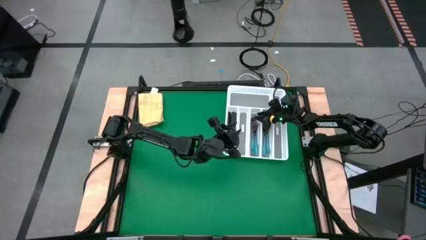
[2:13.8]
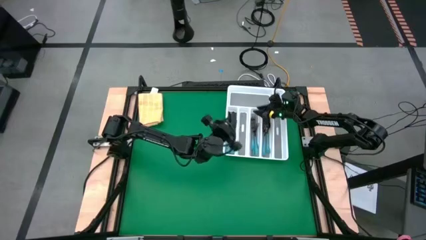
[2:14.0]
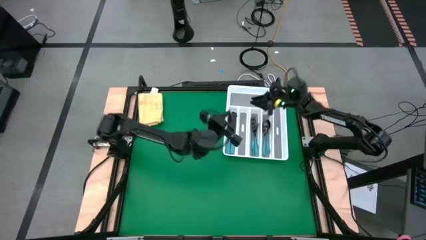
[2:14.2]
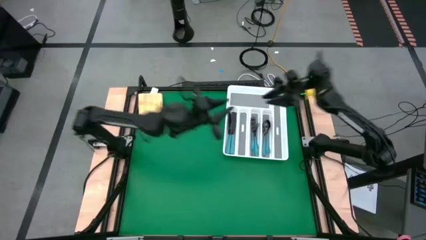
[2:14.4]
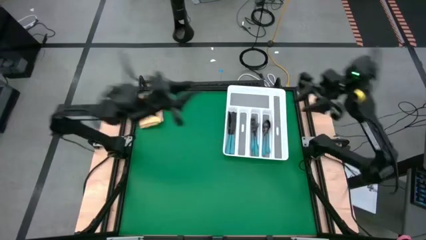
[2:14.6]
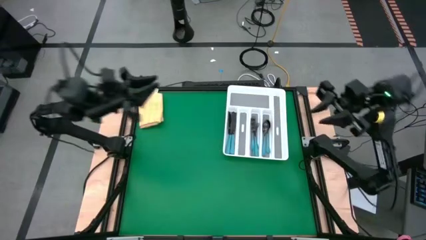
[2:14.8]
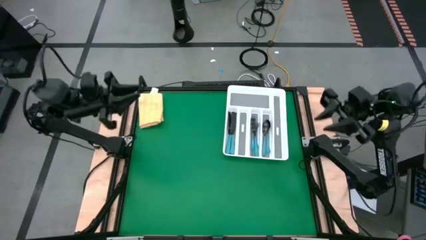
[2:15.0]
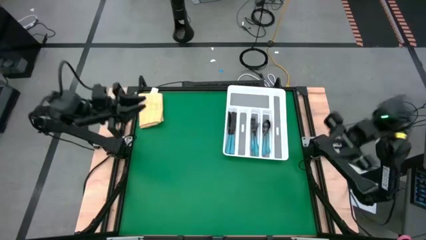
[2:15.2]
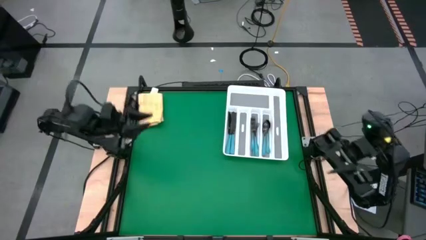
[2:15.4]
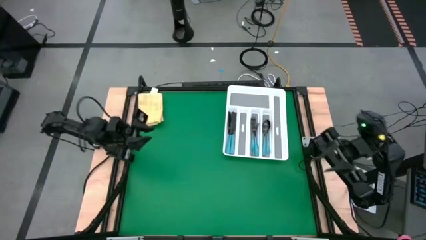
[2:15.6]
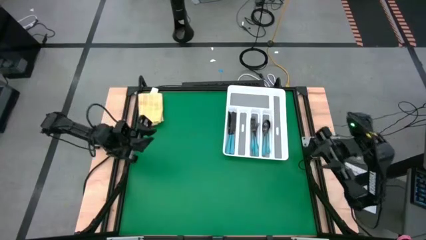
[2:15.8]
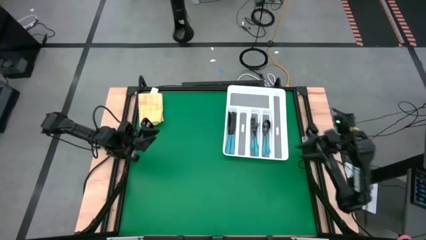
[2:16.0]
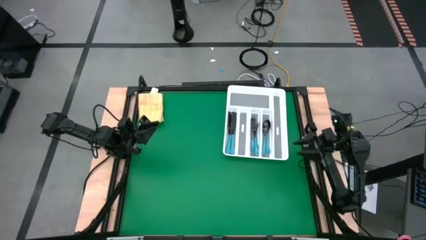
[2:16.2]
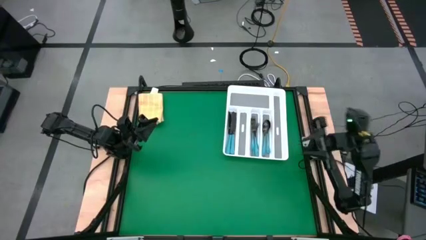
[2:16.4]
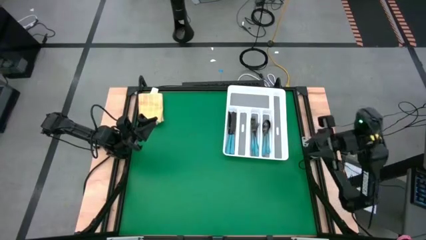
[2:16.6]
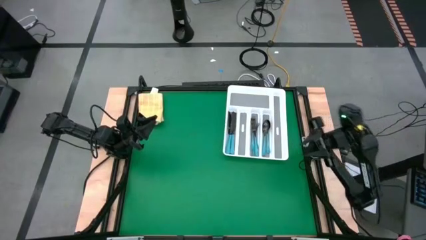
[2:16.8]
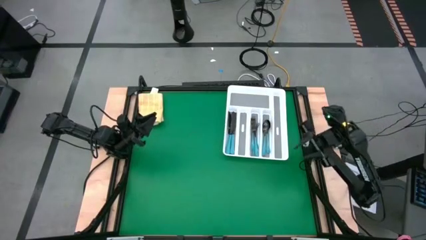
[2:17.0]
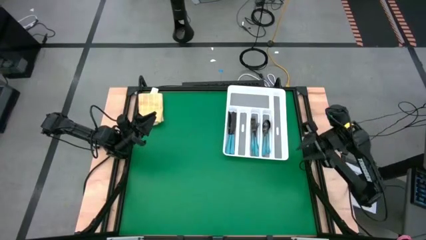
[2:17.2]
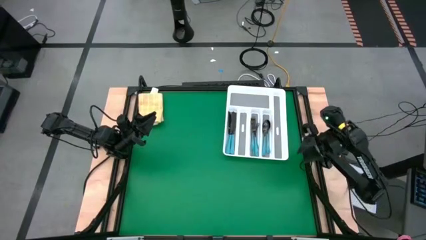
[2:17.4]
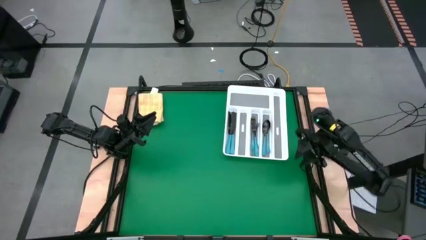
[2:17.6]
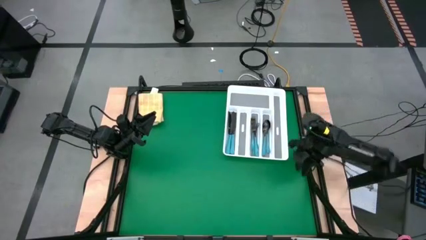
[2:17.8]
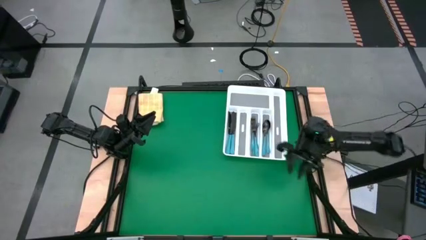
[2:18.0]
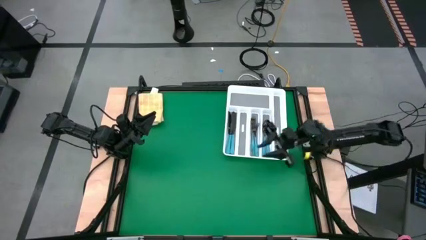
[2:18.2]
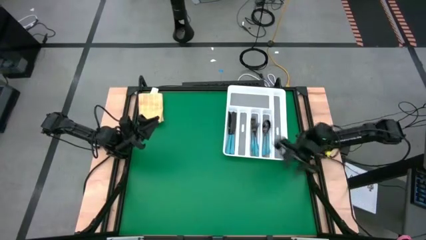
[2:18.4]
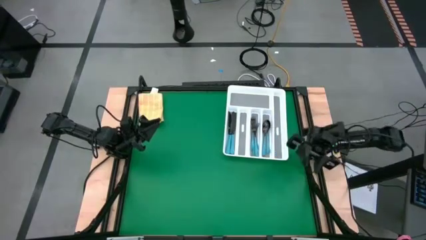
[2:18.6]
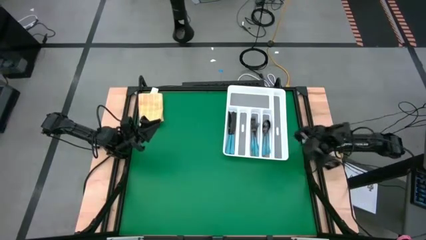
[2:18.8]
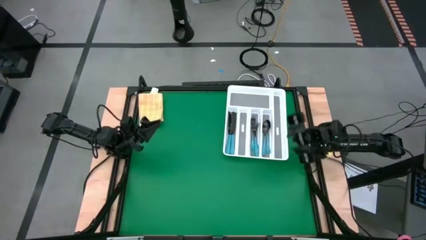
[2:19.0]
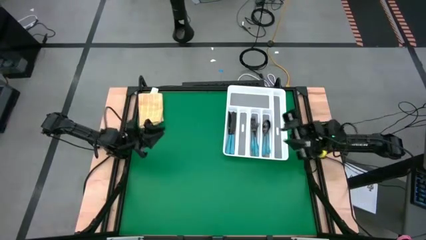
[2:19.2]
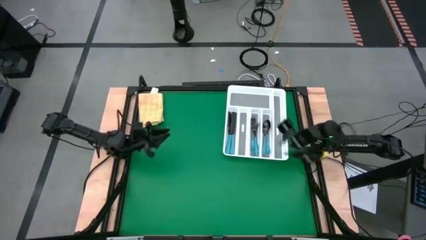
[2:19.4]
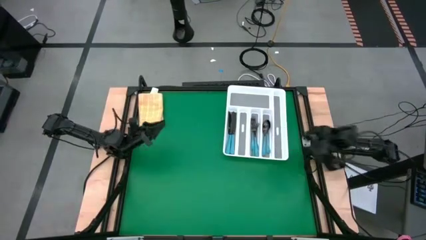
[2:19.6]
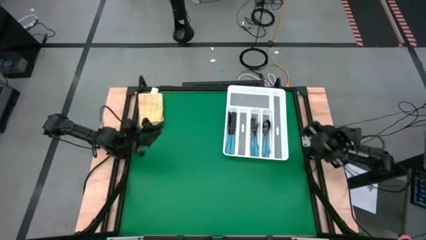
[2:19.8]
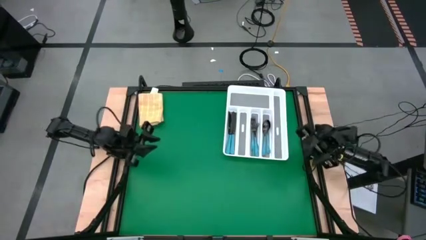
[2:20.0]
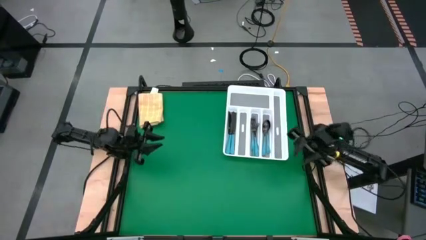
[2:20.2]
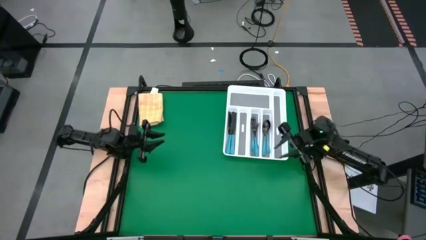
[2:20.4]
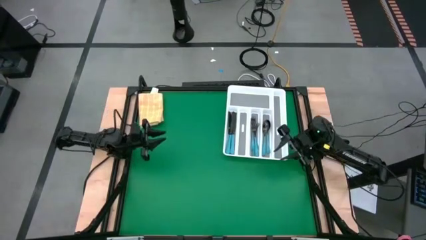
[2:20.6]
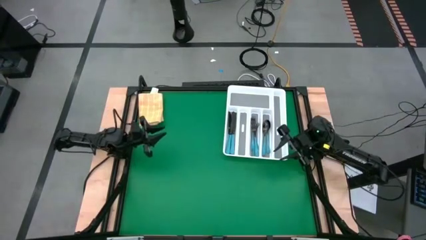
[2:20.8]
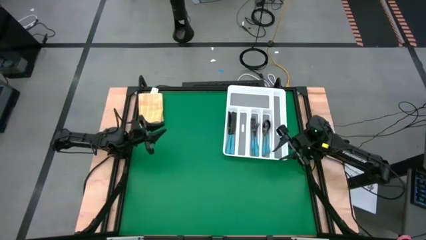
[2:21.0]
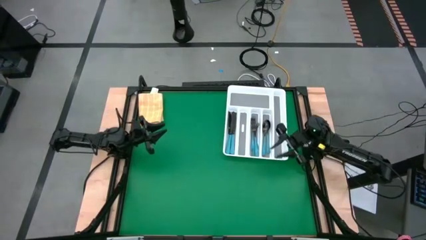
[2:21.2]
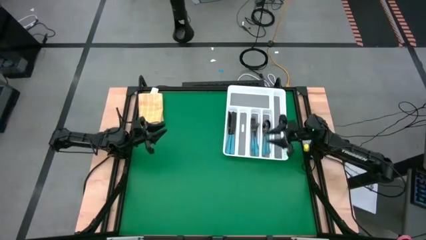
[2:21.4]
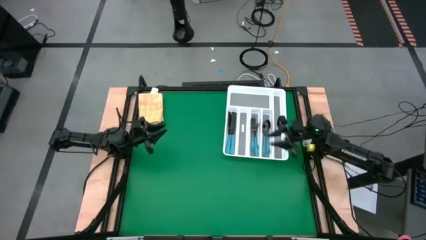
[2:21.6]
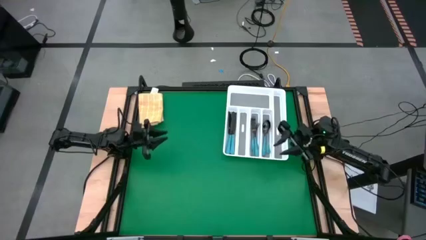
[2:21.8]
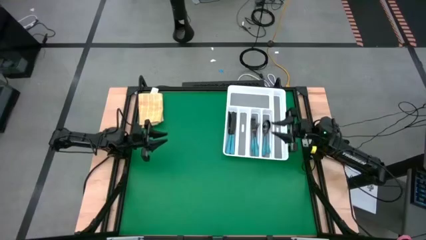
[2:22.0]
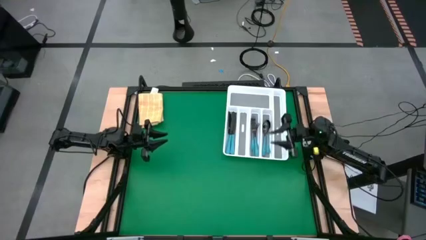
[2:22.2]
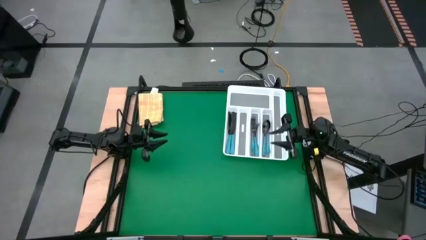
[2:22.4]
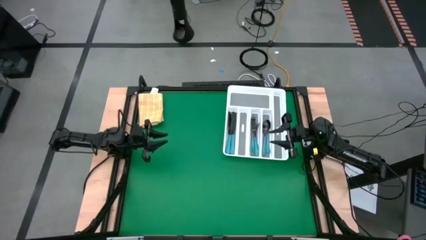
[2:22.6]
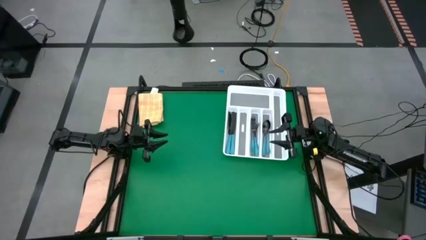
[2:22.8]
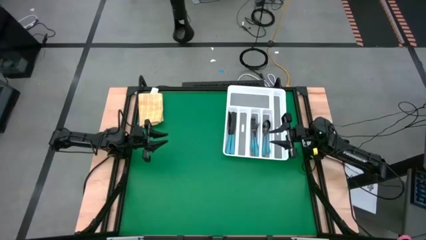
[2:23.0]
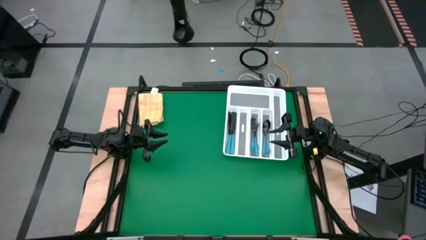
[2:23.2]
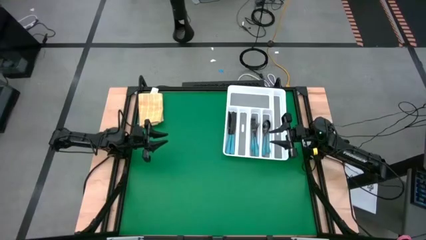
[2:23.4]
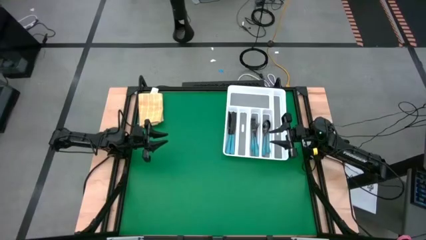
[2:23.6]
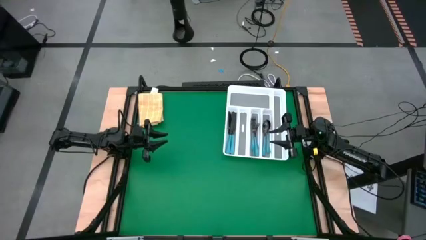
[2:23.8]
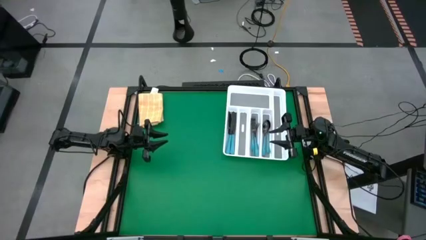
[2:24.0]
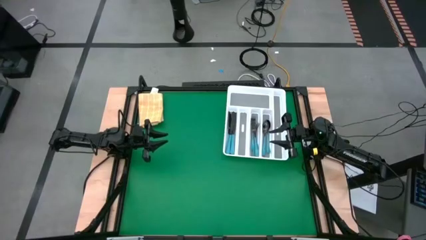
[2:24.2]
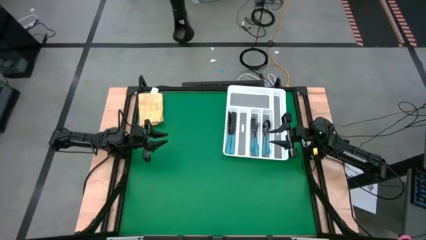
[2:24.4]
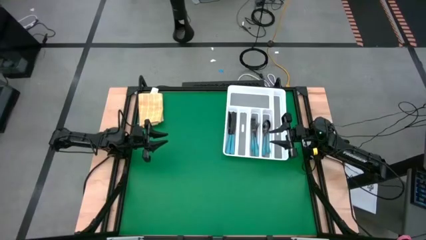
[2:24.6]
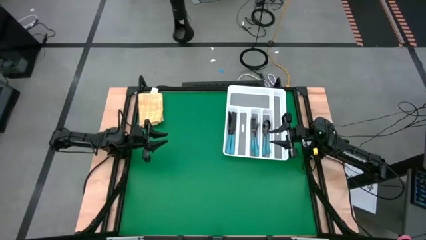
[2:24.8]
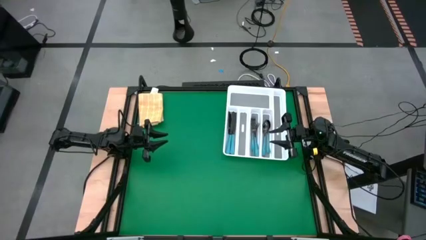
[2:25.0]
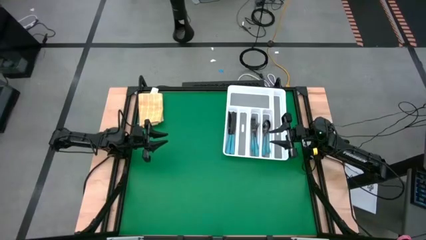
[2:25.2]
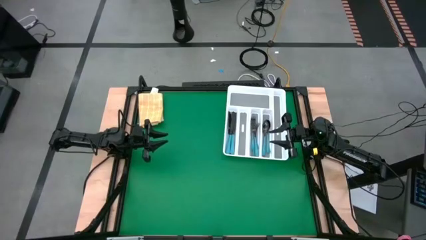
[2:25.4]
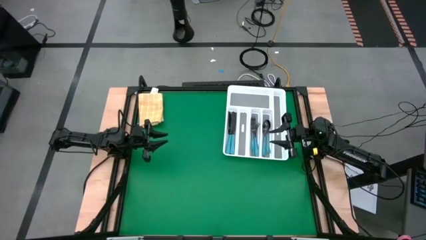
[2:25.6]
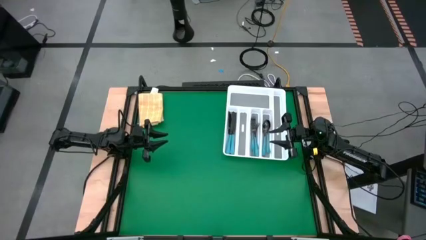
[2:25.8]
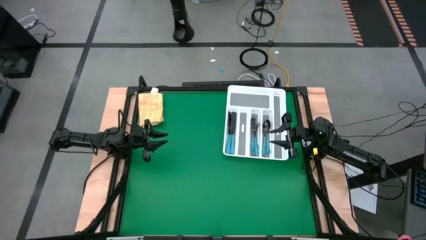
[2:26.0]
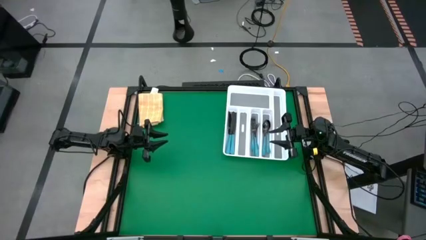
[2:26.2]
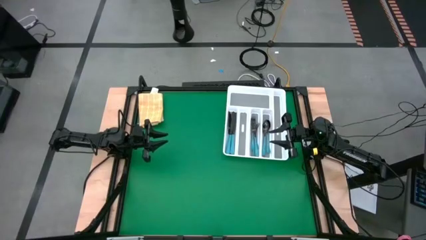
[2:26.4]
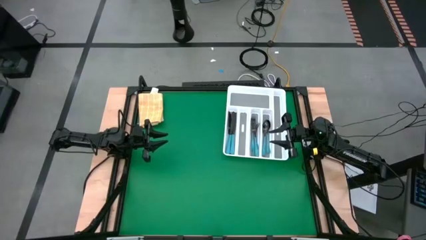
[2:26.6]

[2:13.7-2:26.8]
Task: Sort silverware
Return to Home Position
